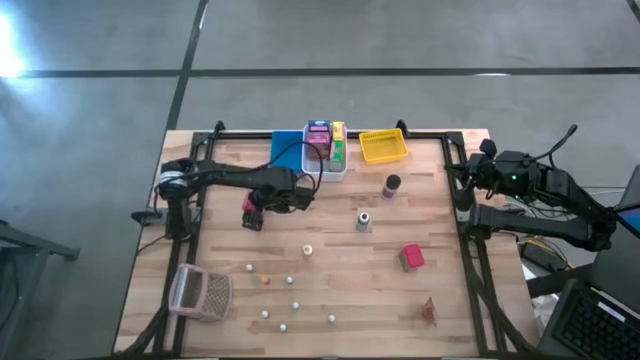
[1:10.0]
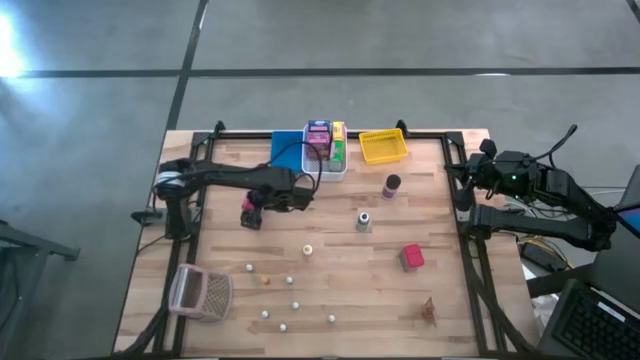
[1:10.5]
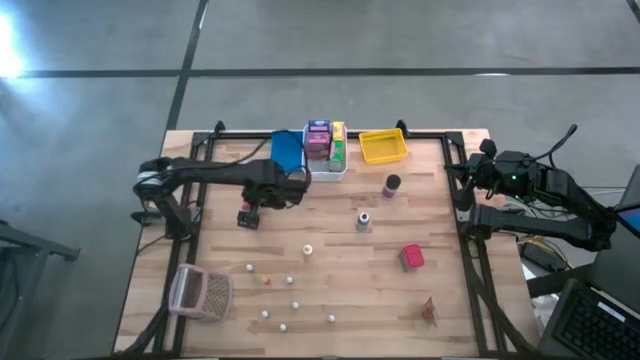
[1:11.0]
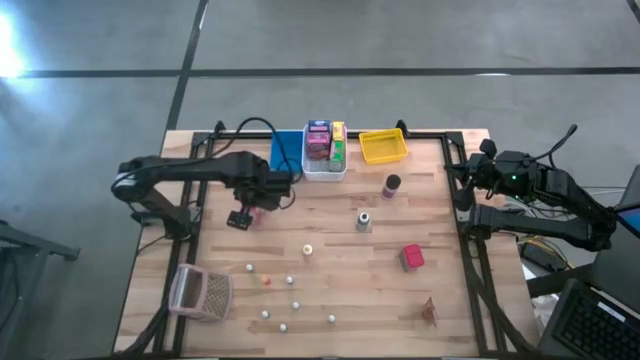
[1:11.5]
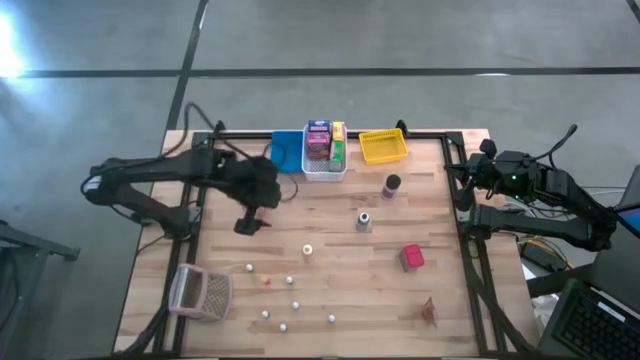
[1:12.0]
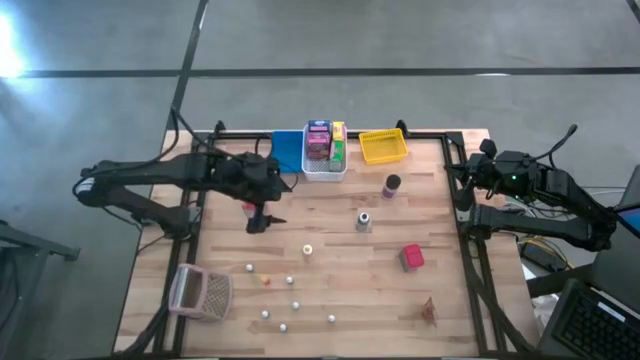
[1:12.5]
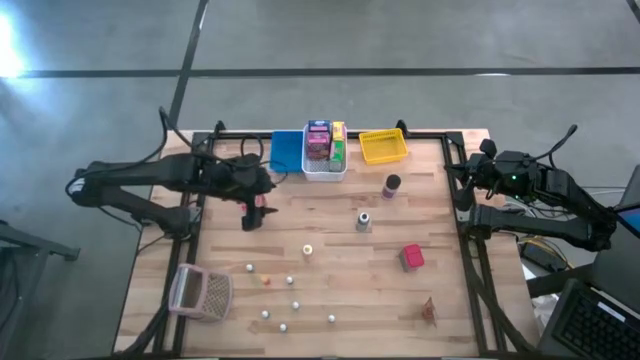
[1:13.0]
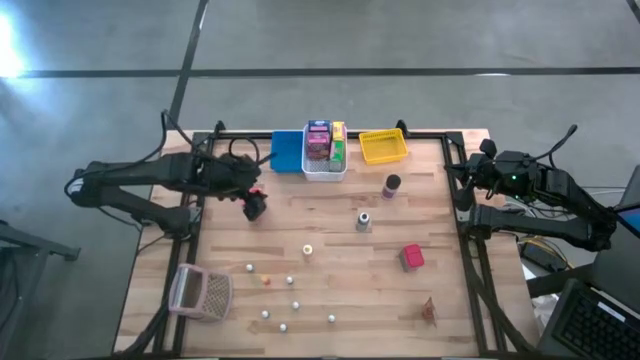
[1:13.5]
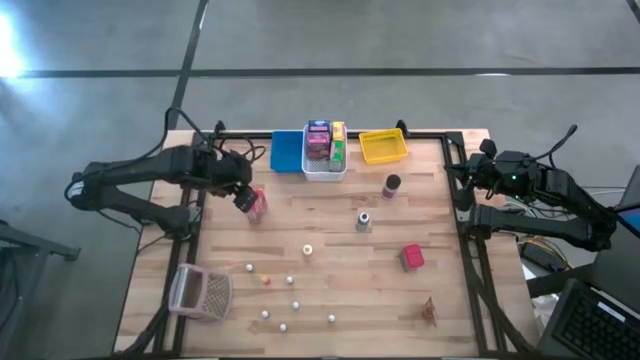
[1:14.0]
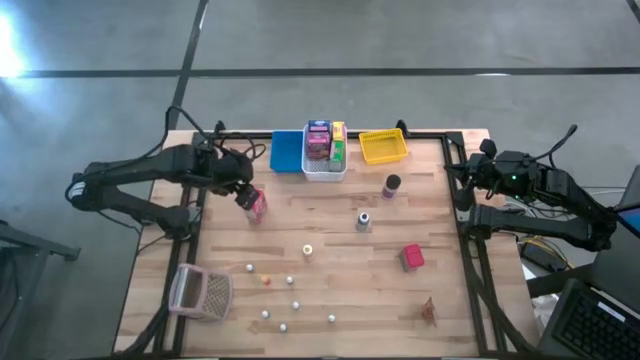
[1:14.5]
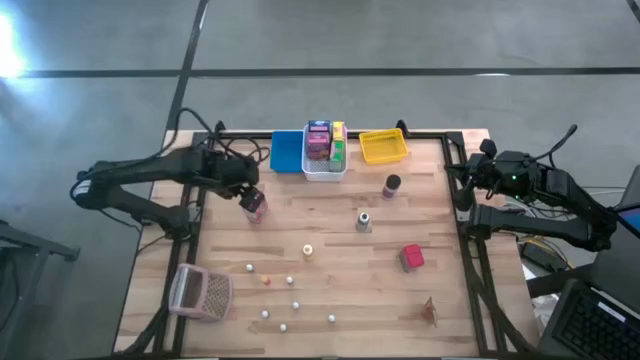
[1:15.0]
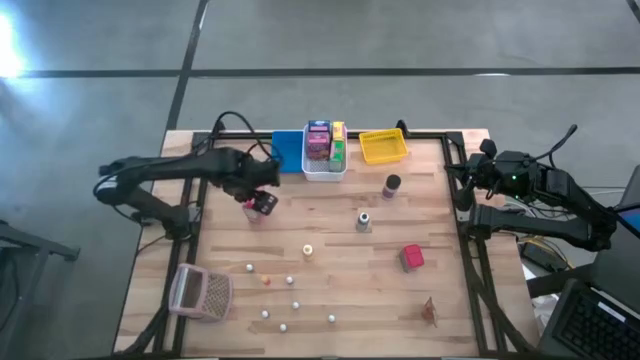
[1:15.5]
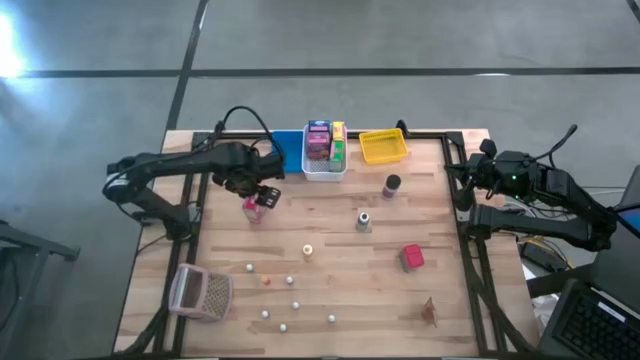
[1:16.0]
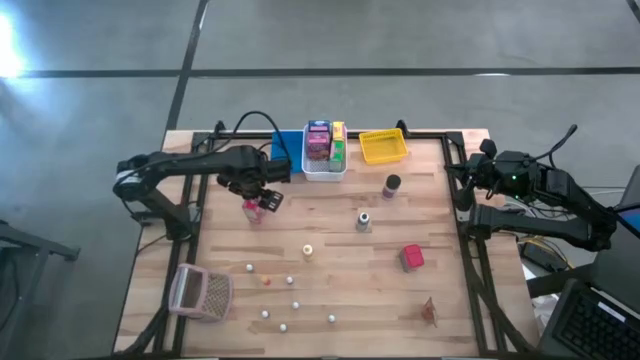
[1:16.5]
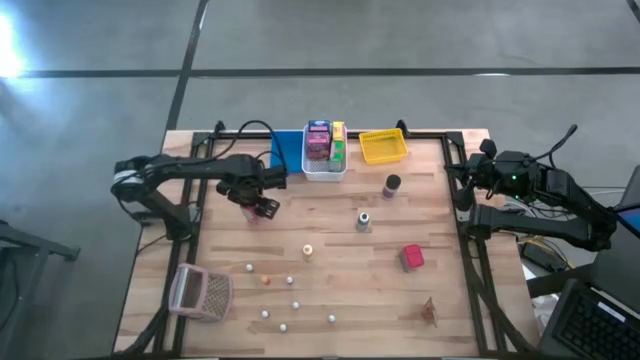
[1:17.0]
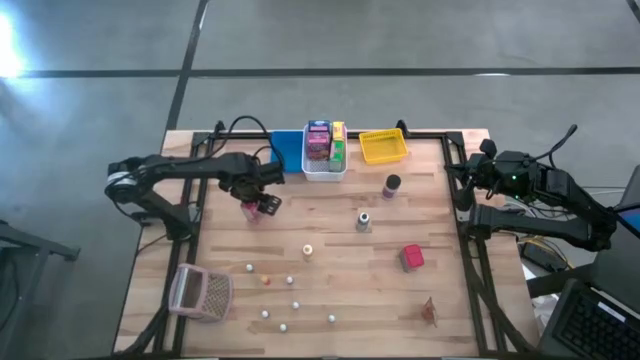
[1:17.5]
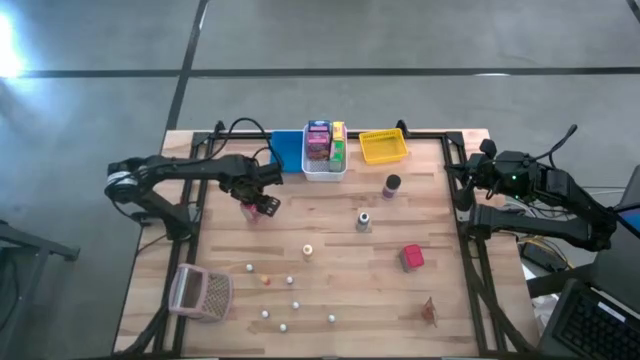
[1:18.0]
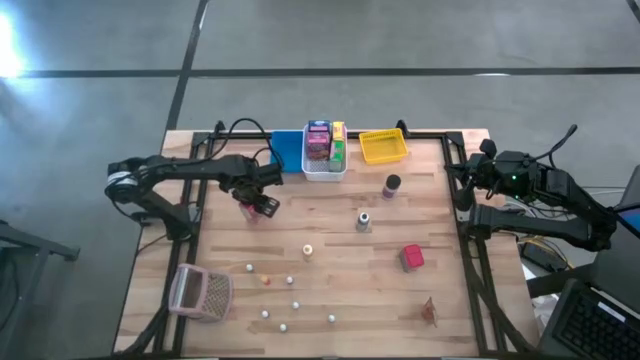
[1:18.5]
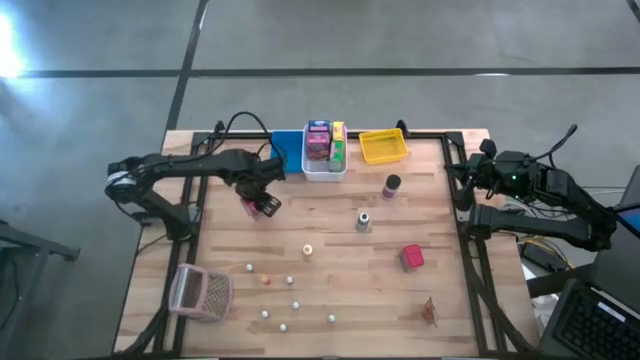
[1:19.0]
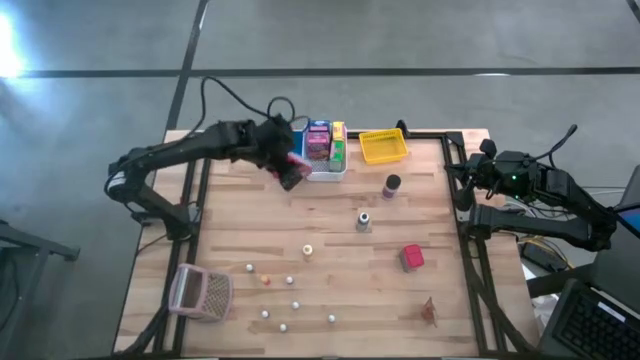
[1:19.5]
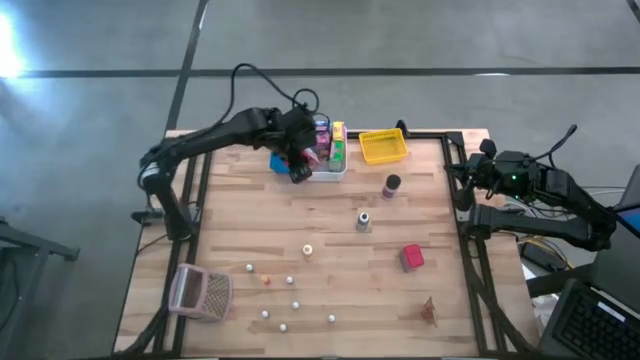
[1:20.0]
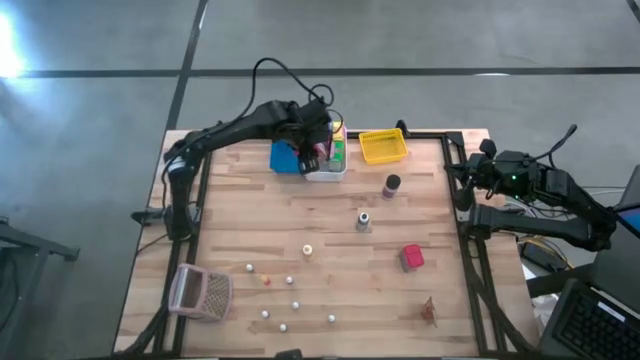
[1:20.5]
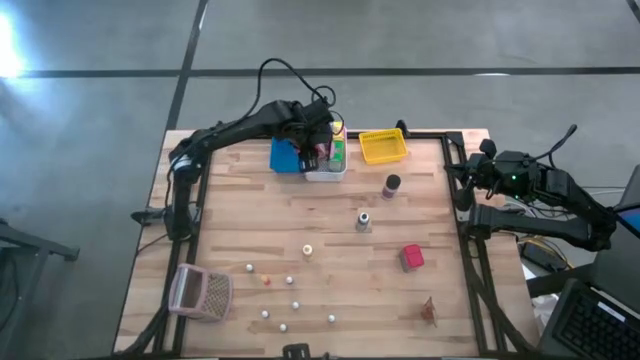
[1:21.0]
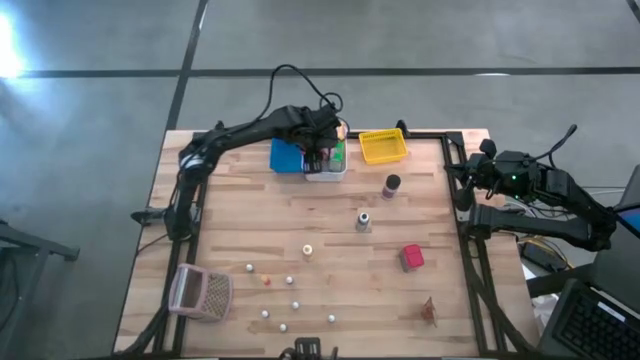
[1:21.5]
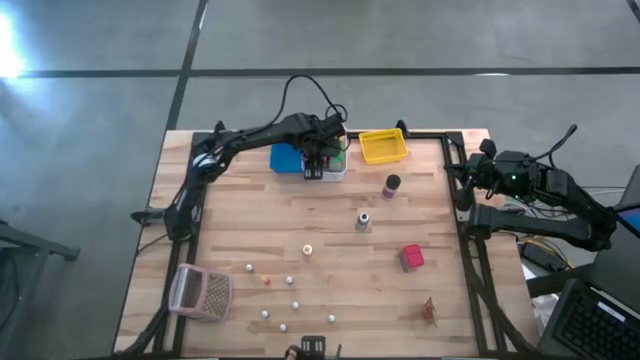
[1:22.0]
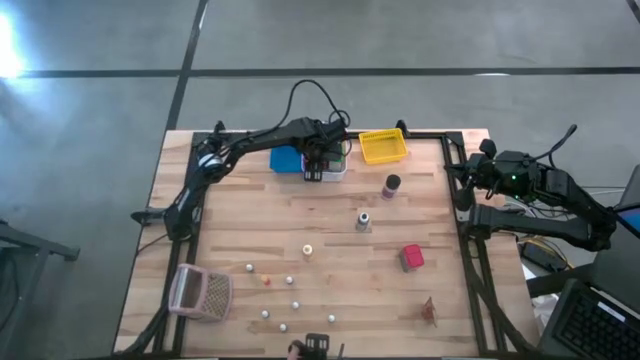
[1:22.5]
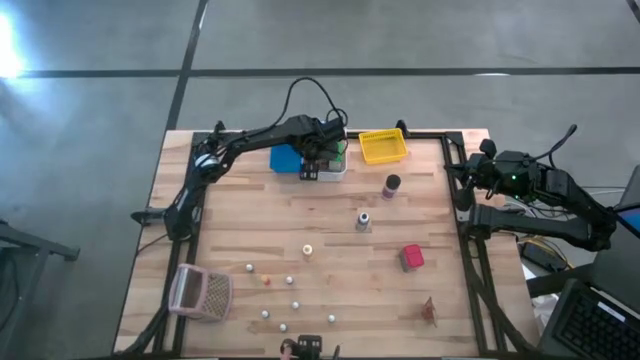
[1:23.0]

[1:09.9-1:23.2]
Task: Pick & Place Kitchen Items
Put the red cereal box into the white bin

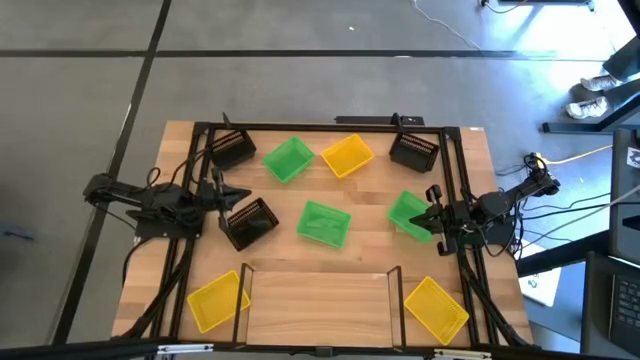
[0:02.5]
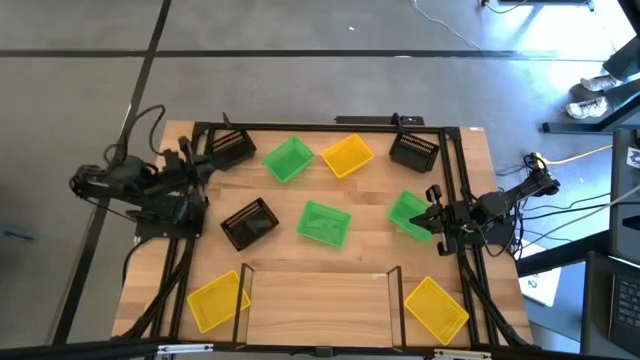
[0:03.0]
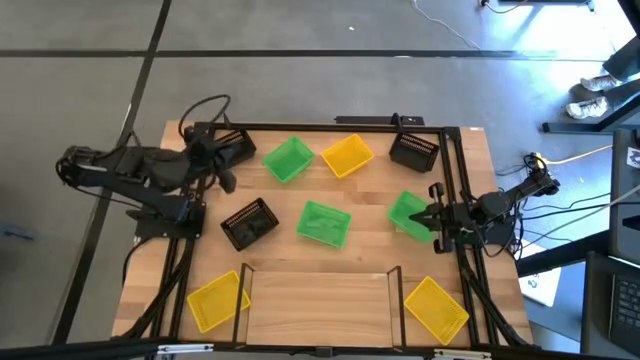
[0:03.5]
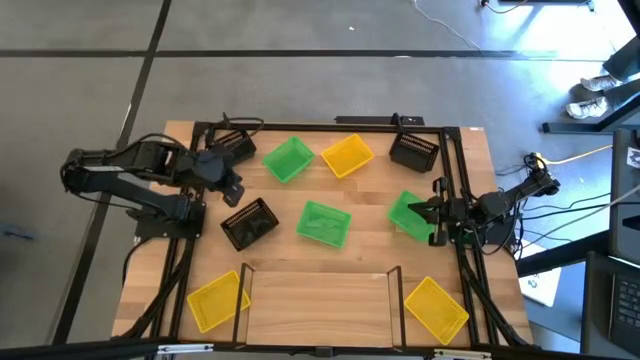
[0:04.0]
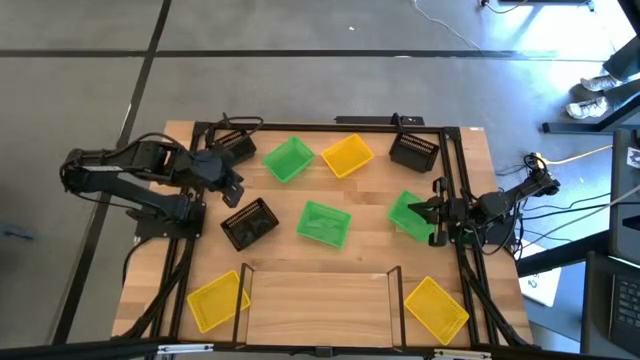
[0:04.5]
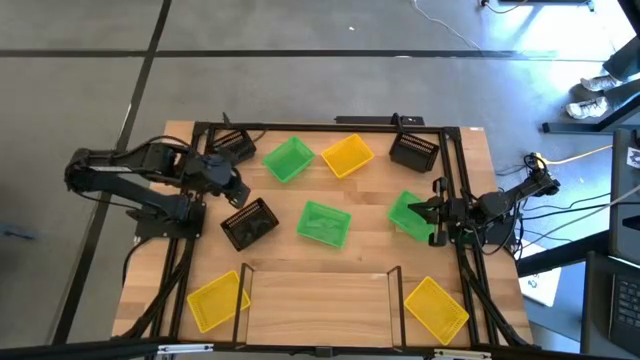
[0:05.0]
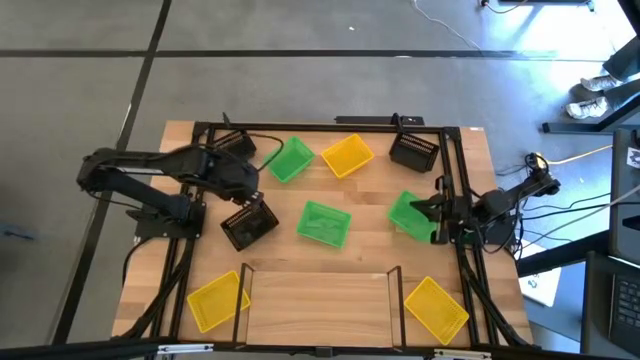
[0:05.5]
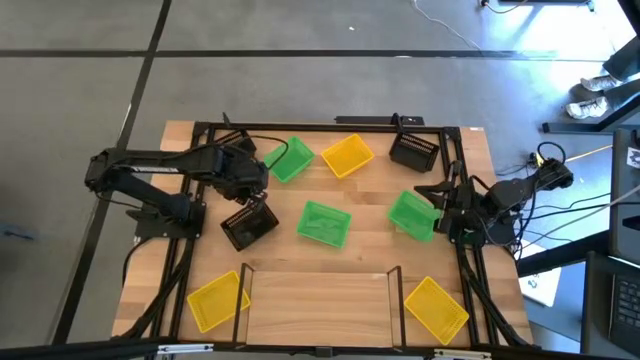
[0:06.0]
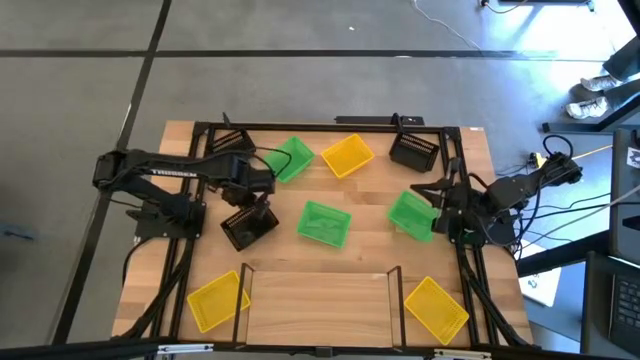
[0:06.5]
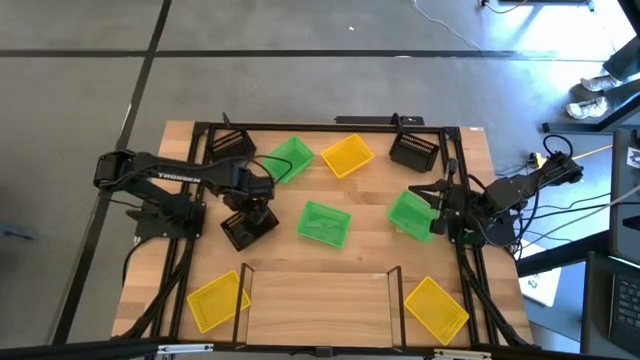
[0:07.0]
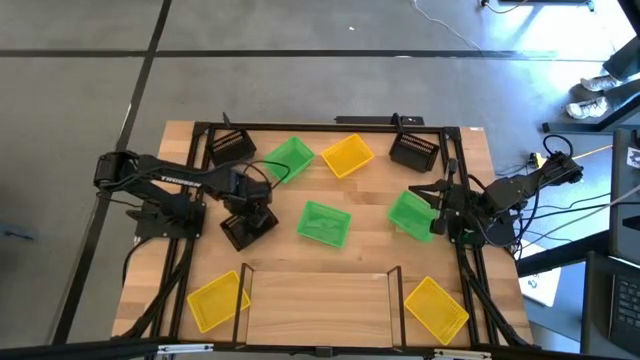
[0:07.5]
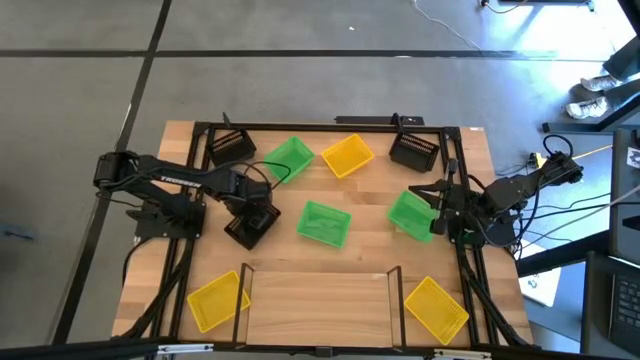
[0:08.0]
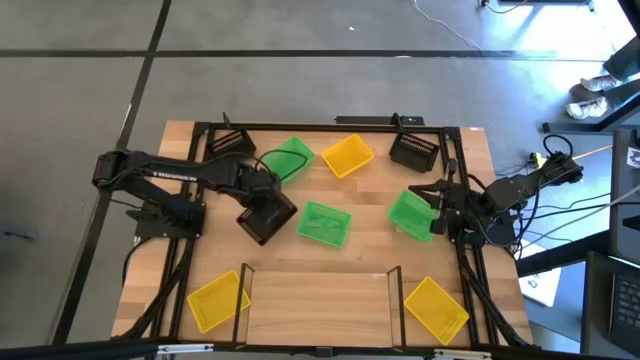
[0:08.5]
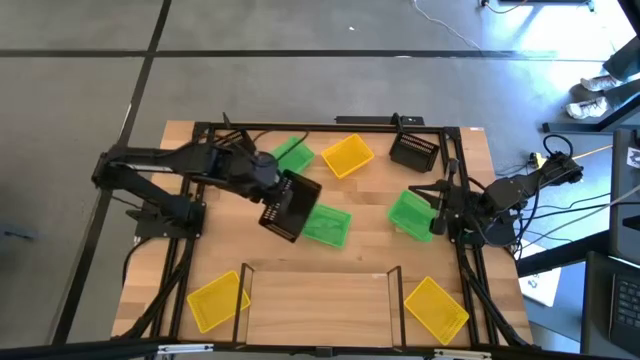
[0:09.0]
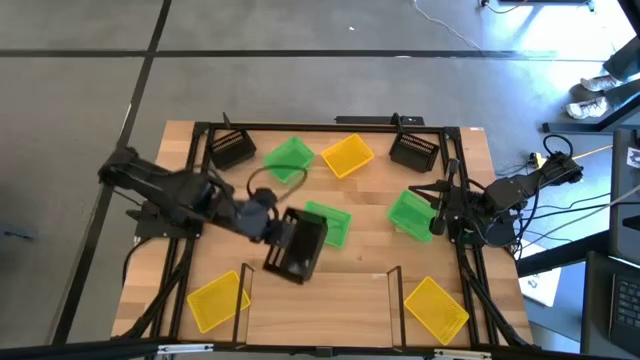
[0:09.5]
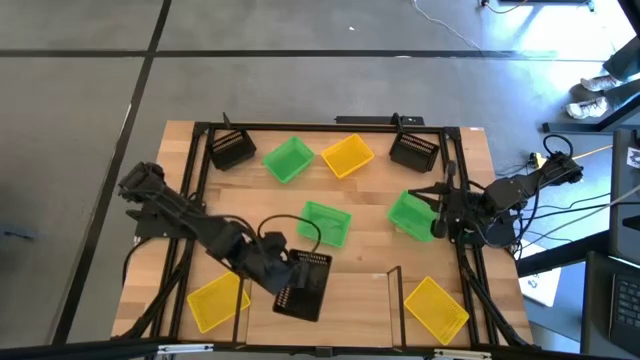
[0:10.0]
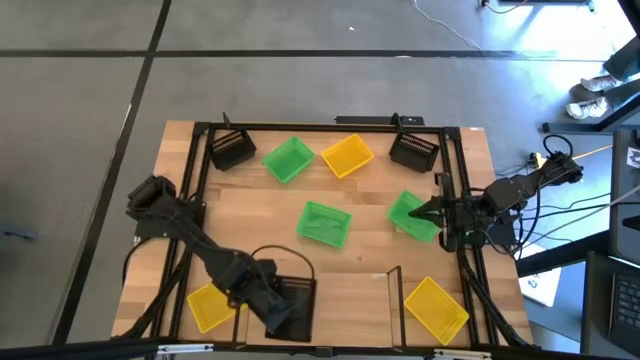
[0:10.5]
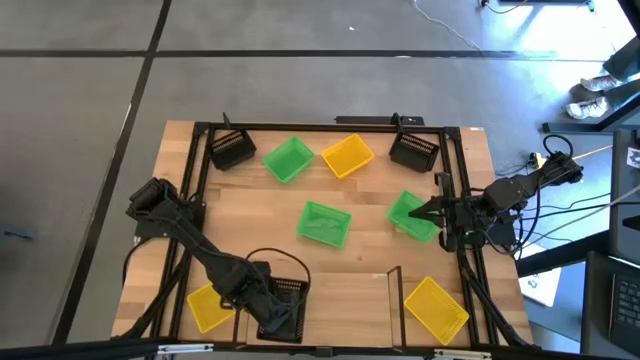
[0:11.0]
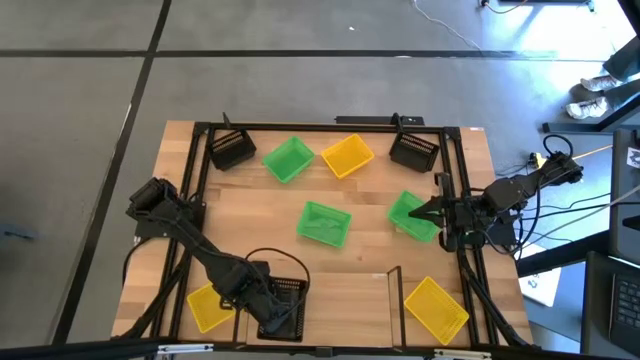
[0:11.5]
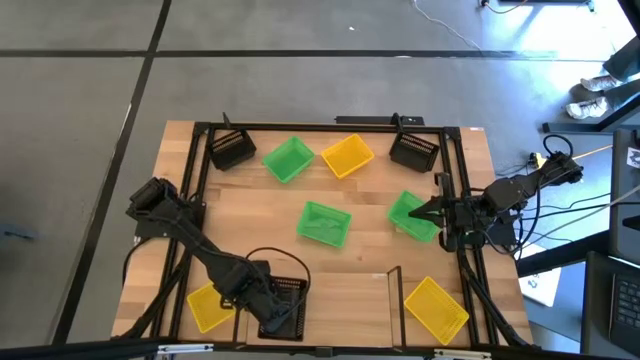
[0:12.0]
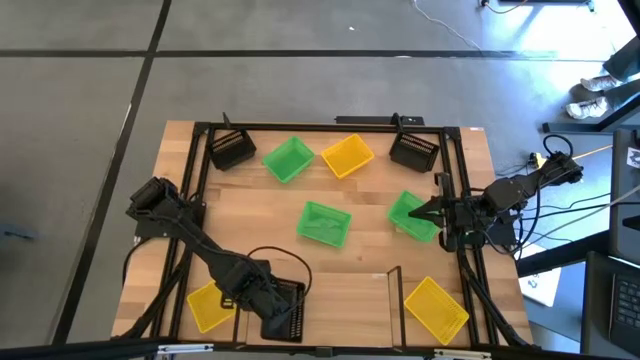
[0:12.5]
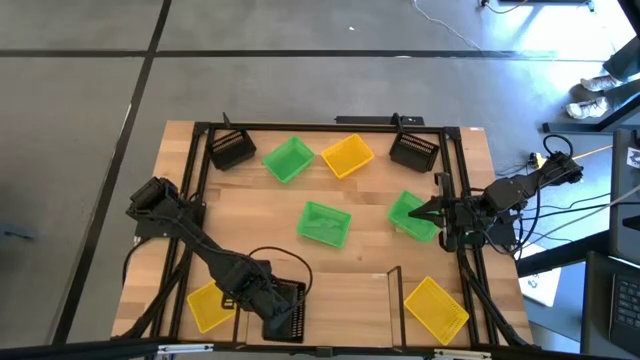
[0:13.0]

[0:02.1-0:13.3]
Task: Stack baskets on shelf by color
Put the bottom black basket on the shelf
